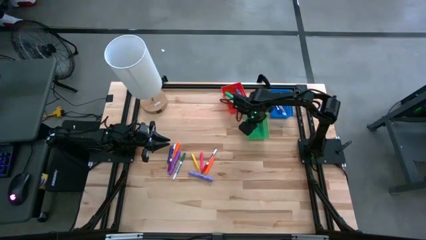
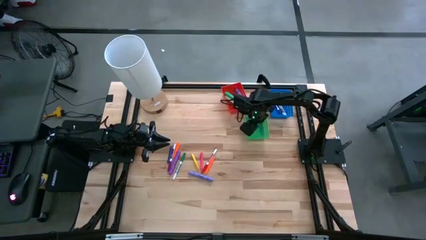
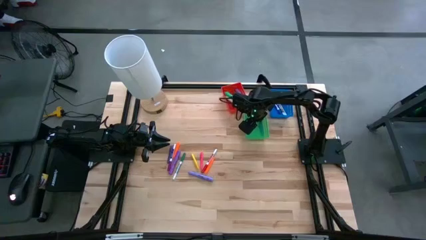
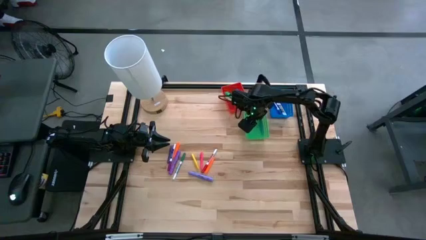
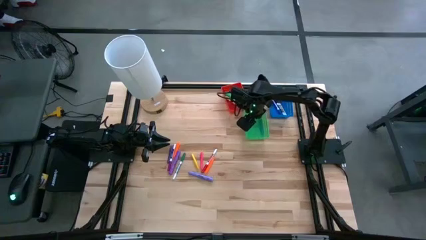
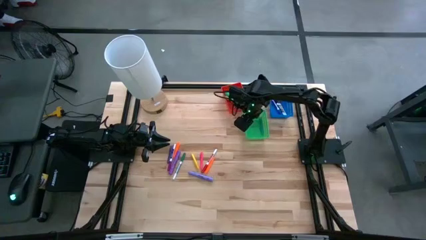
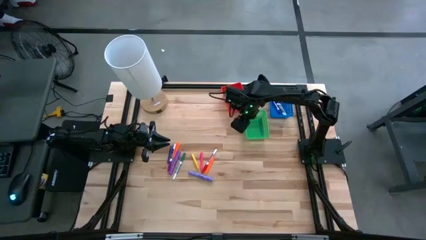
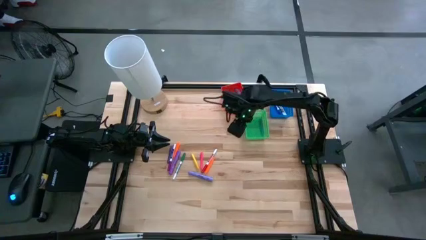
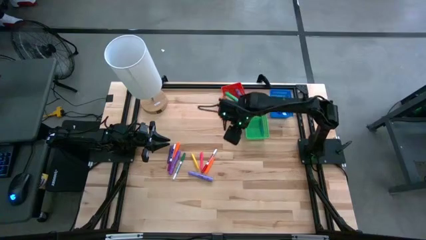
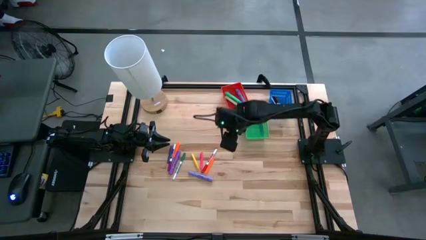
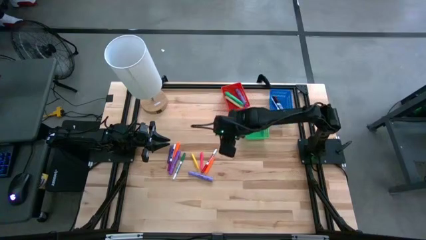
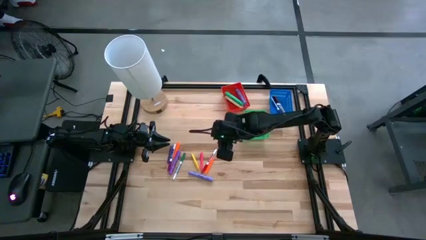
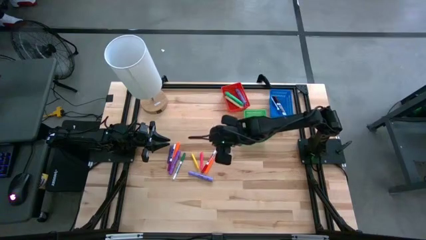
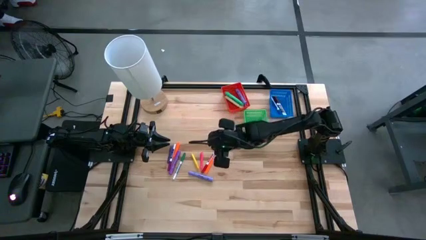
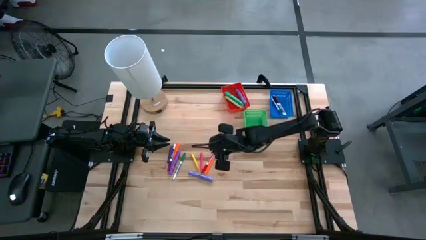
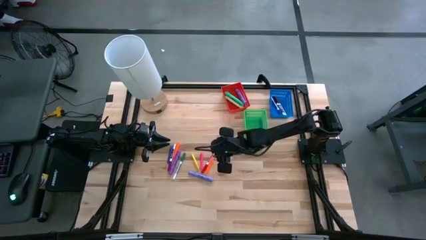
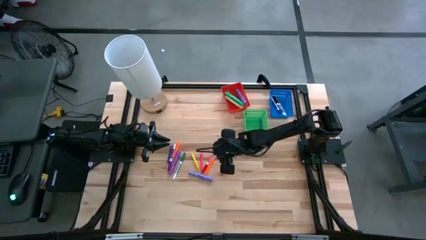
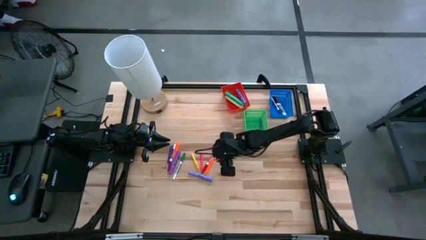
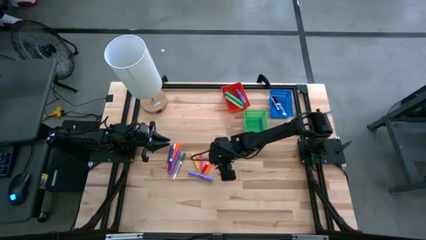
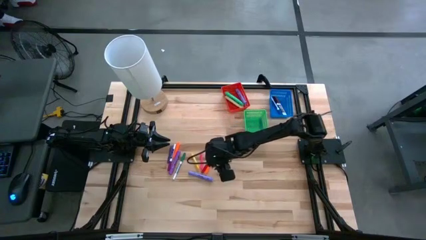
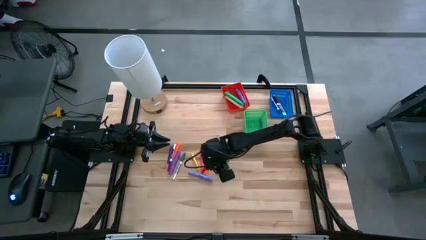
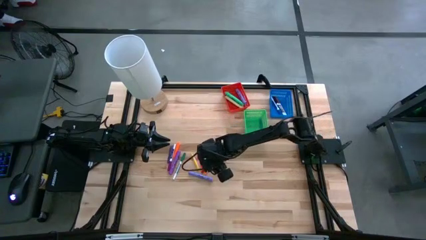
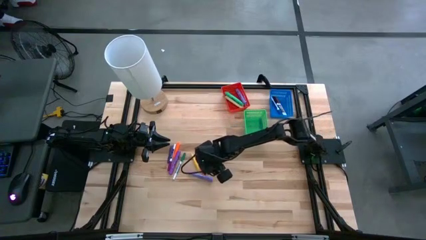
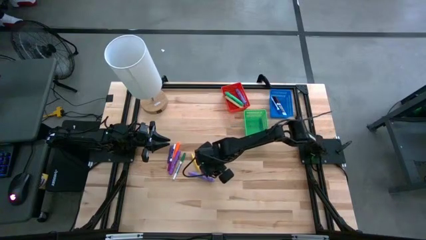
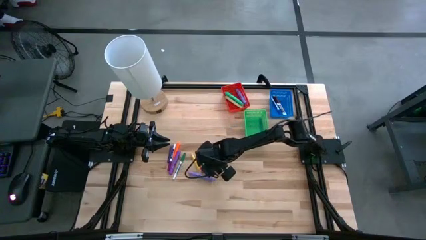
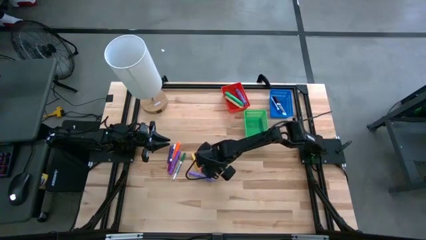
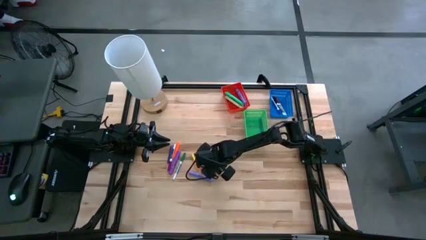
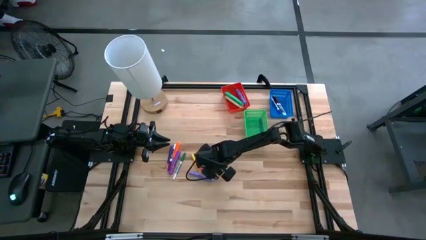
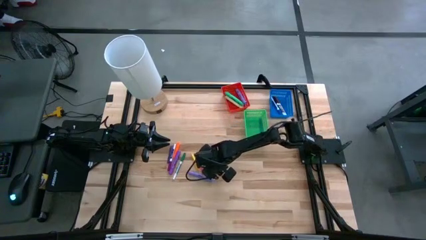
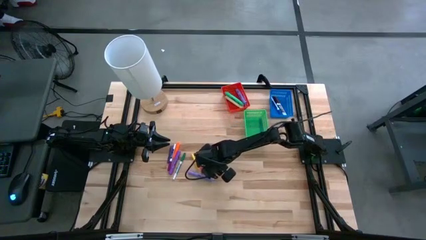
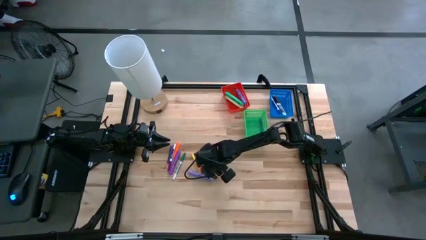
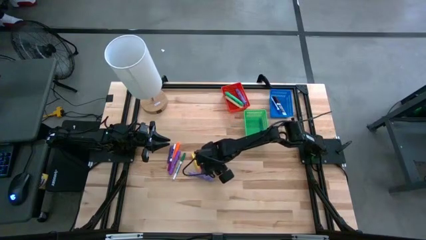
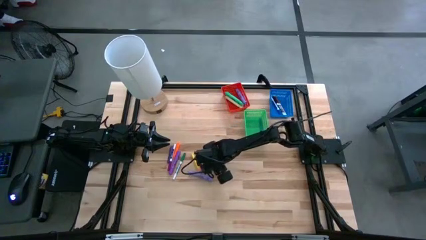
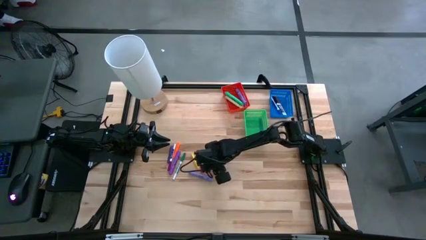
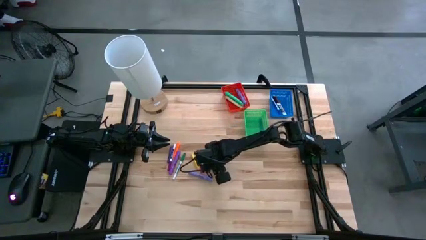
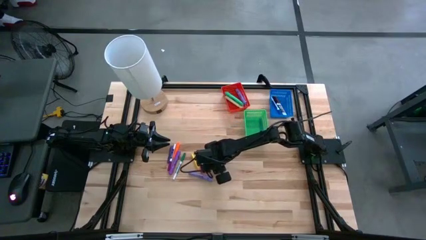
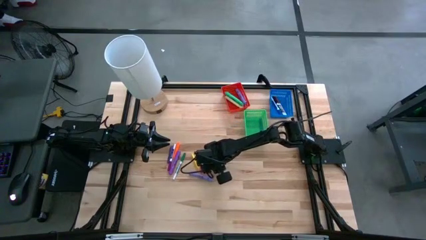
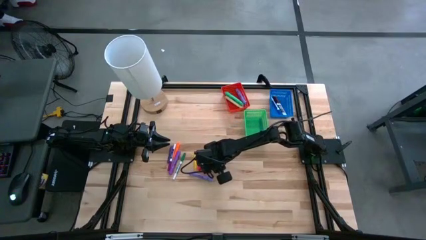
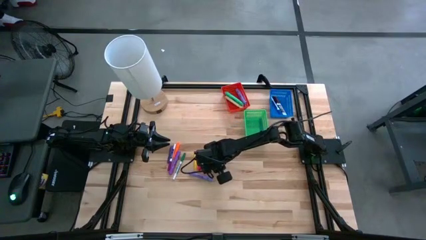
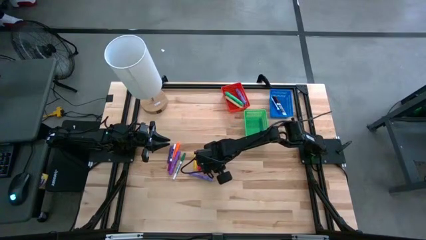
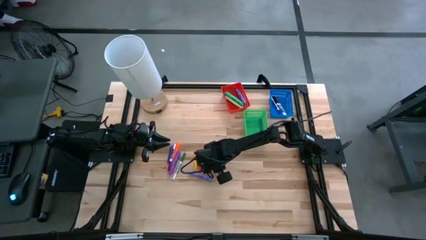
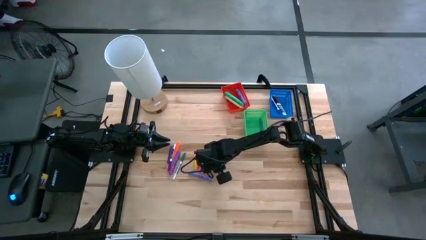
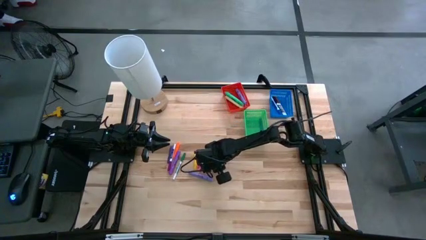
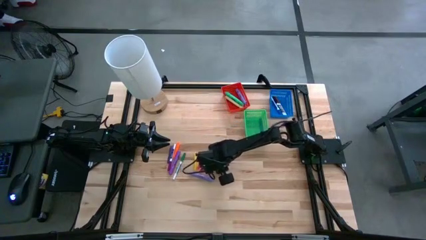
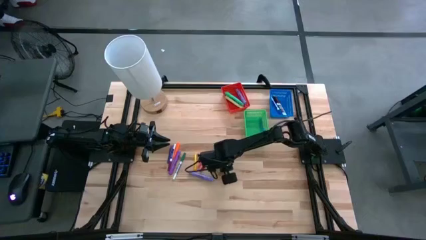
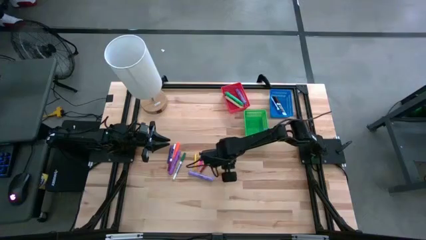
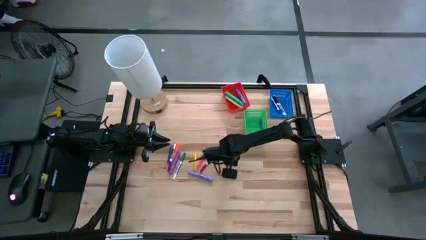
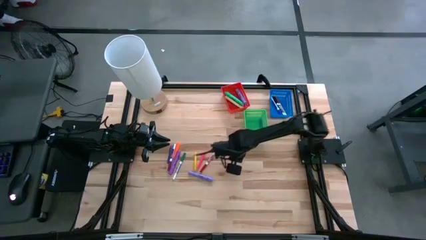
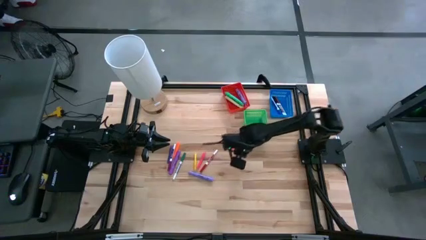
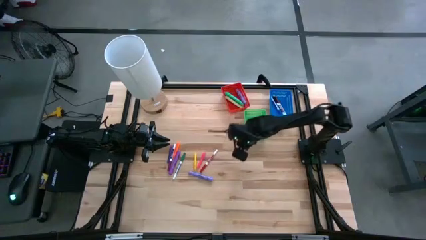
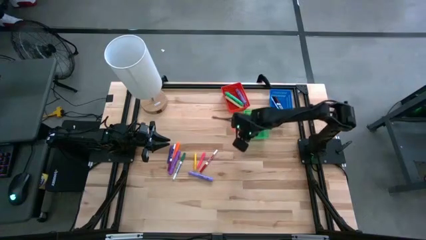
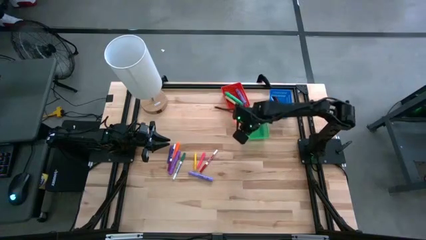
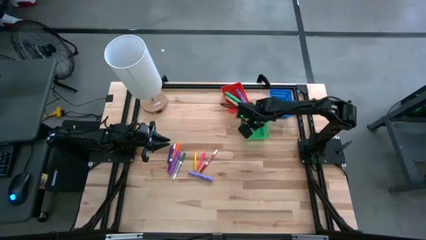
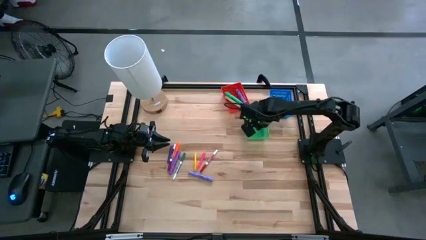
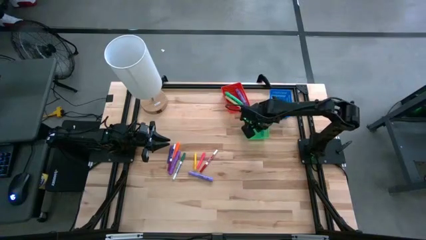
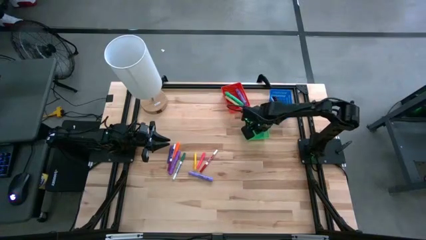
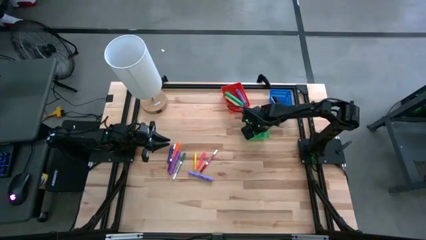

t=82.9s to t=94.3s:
Task: Pick & Place Markers
Put the right orange pen in the green bin
